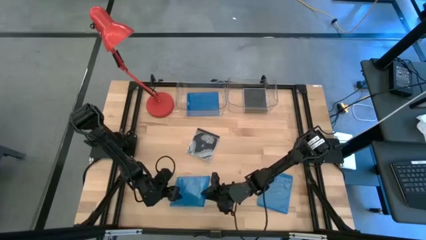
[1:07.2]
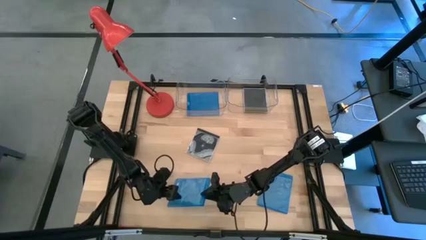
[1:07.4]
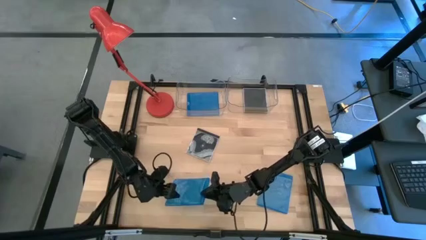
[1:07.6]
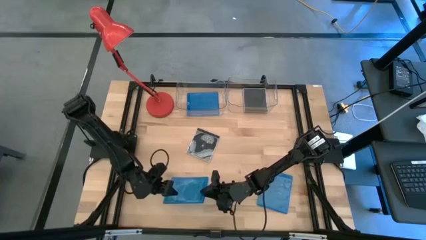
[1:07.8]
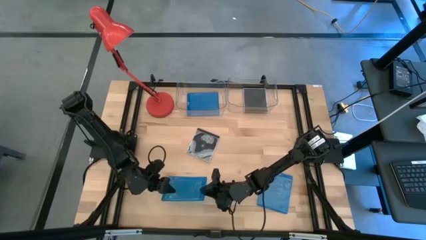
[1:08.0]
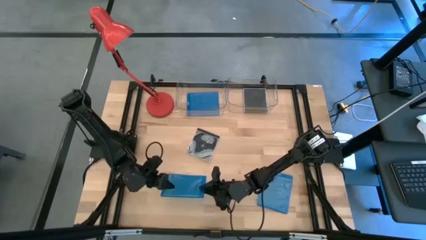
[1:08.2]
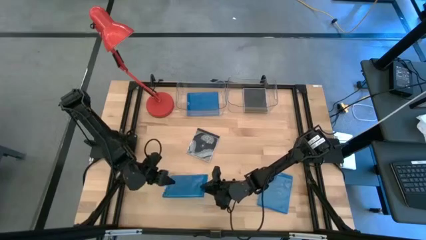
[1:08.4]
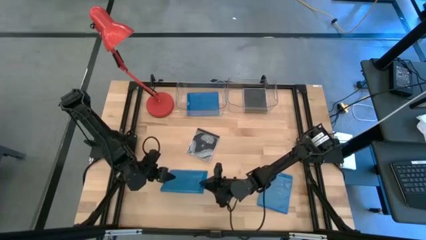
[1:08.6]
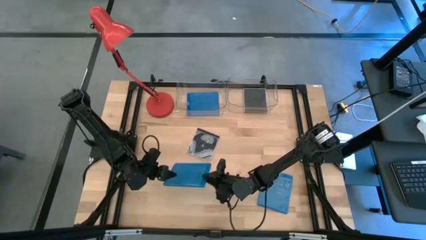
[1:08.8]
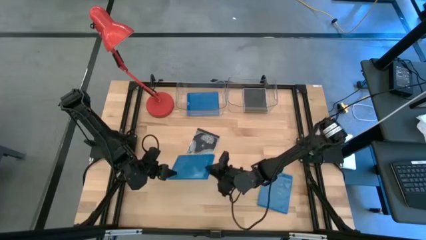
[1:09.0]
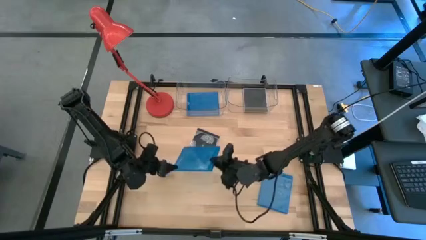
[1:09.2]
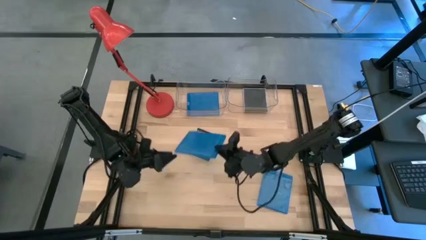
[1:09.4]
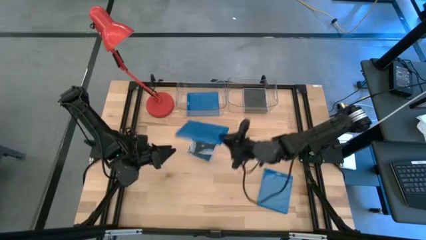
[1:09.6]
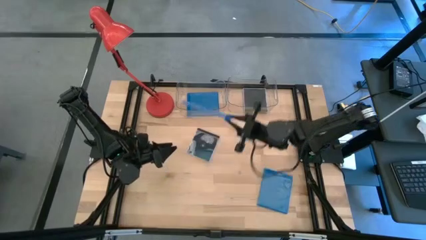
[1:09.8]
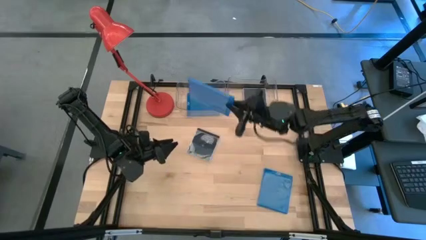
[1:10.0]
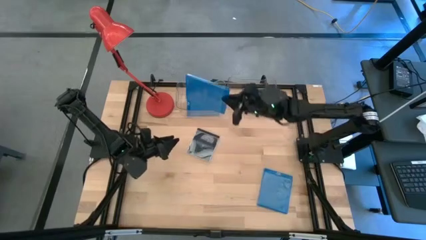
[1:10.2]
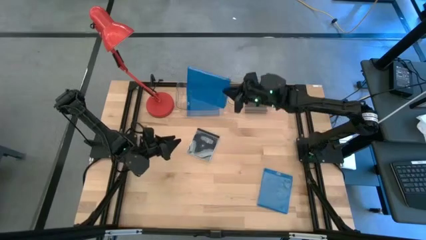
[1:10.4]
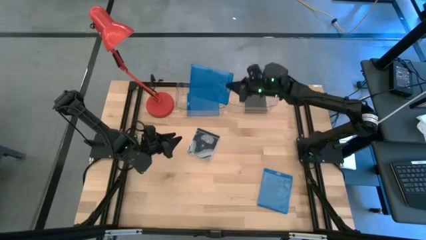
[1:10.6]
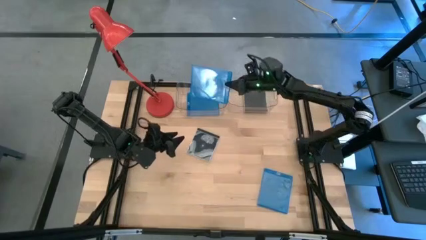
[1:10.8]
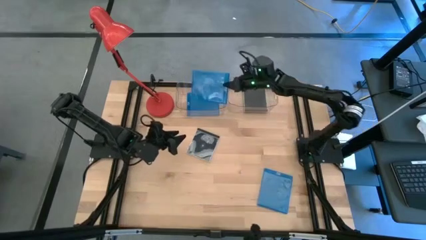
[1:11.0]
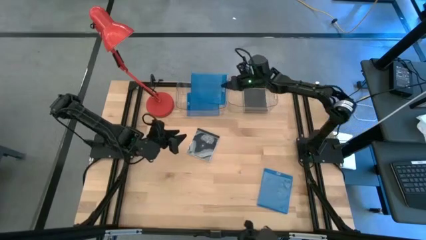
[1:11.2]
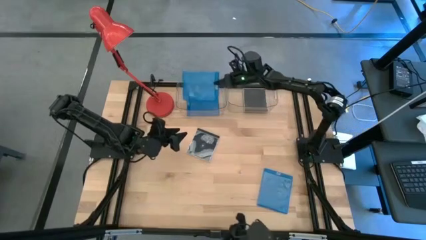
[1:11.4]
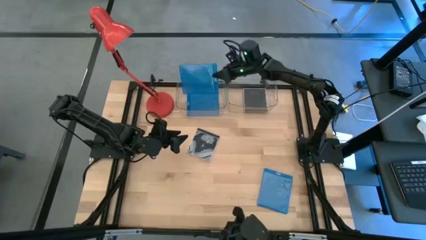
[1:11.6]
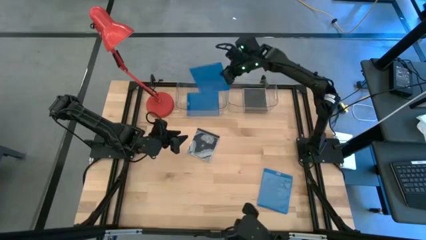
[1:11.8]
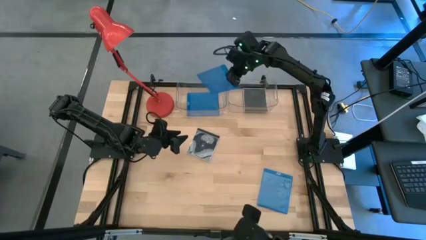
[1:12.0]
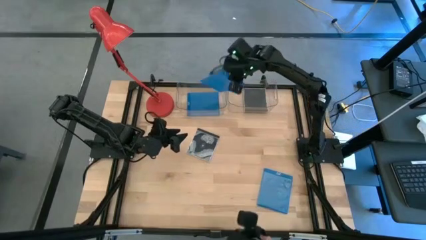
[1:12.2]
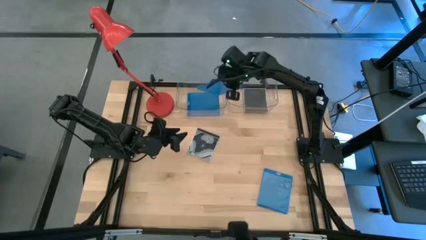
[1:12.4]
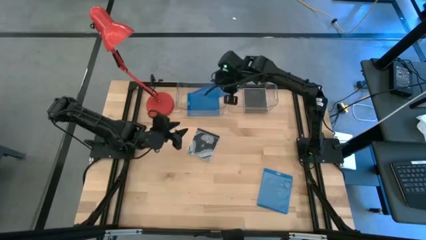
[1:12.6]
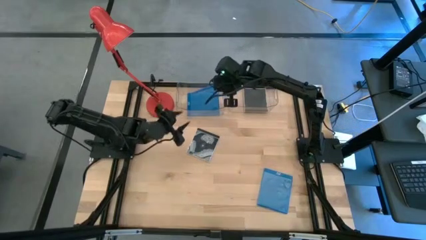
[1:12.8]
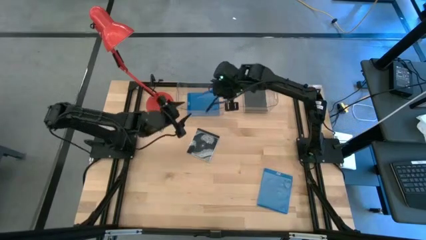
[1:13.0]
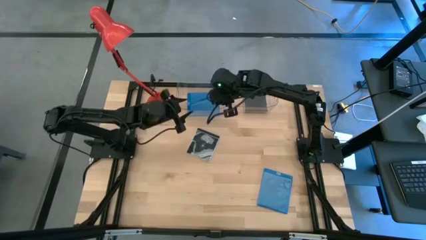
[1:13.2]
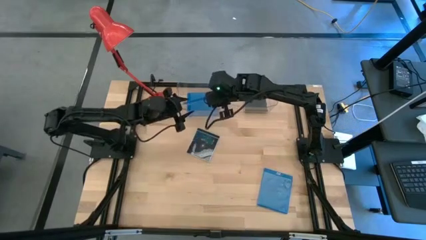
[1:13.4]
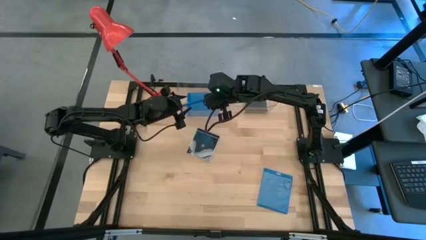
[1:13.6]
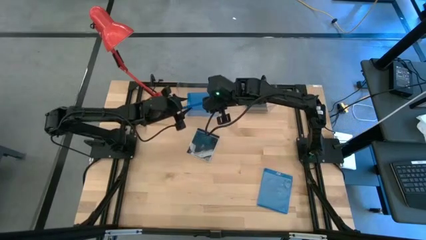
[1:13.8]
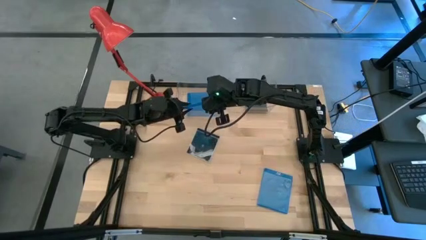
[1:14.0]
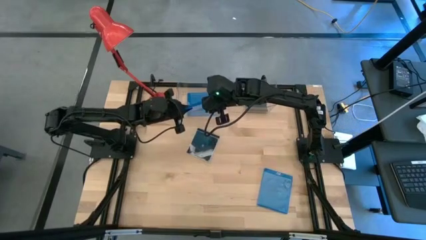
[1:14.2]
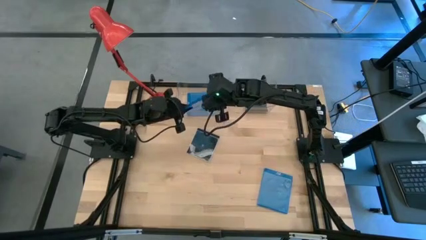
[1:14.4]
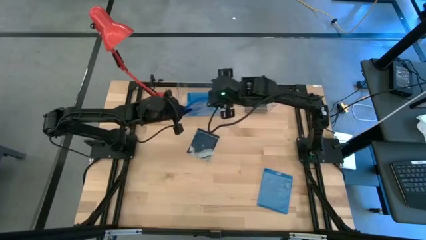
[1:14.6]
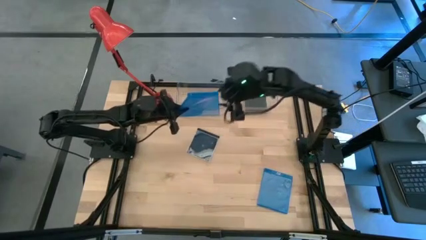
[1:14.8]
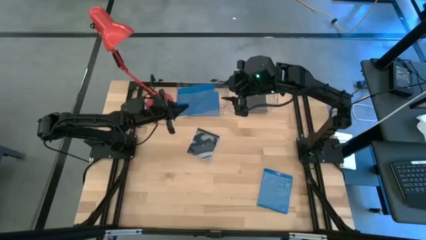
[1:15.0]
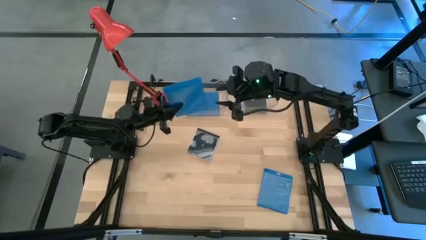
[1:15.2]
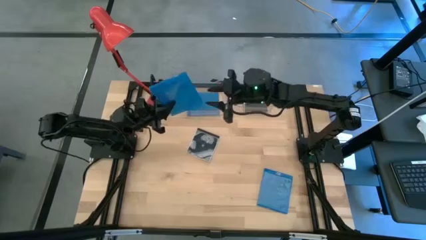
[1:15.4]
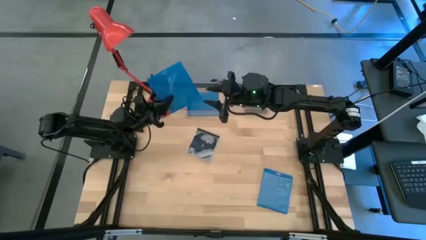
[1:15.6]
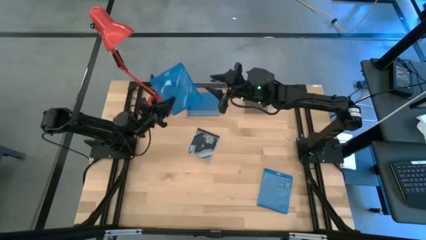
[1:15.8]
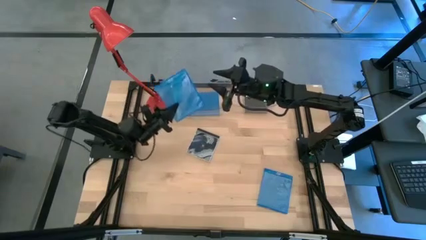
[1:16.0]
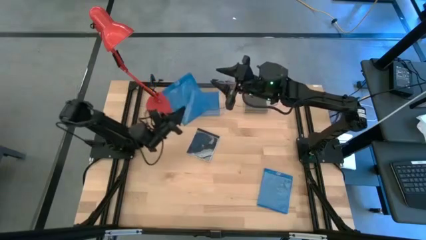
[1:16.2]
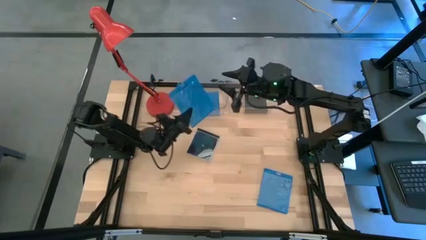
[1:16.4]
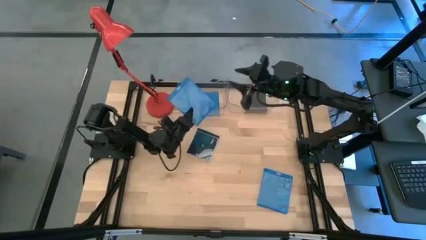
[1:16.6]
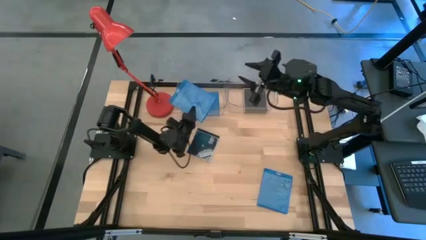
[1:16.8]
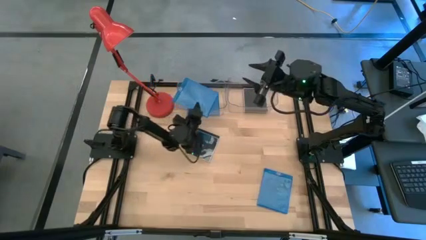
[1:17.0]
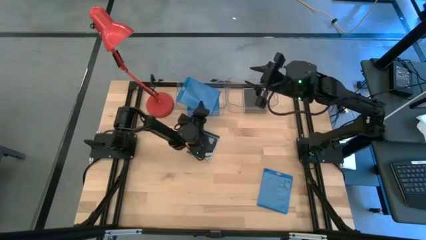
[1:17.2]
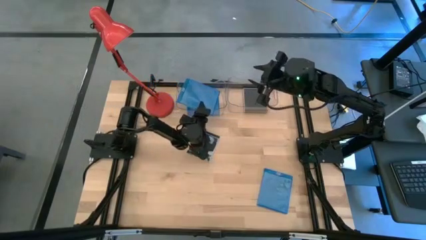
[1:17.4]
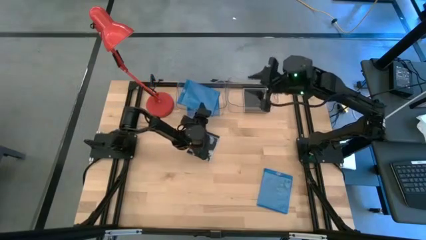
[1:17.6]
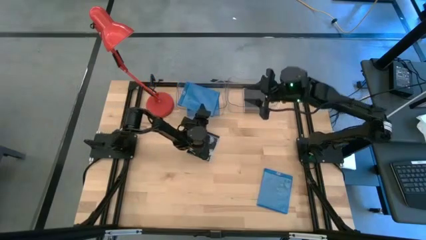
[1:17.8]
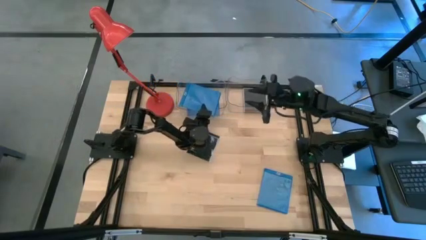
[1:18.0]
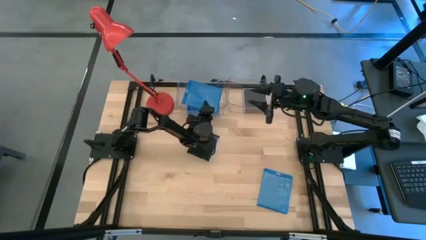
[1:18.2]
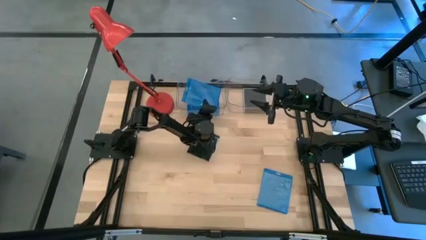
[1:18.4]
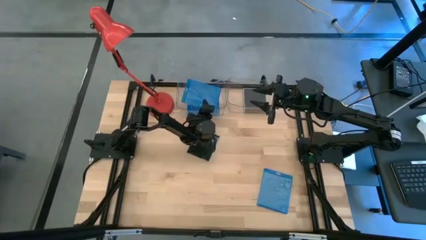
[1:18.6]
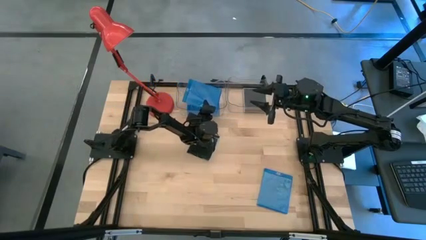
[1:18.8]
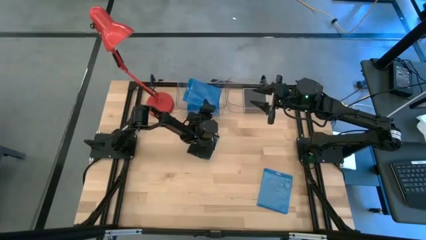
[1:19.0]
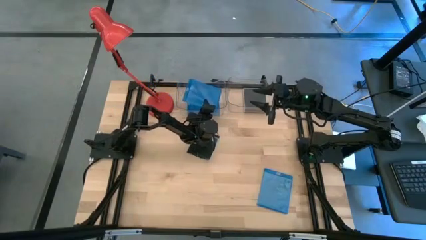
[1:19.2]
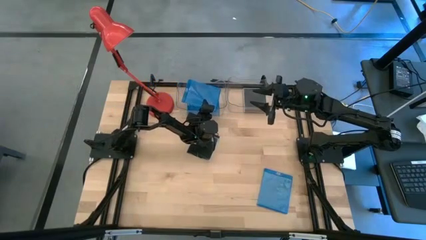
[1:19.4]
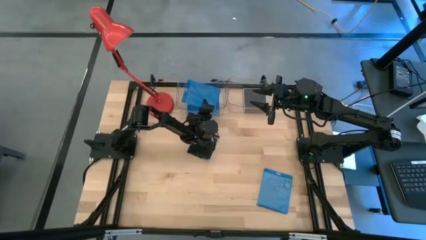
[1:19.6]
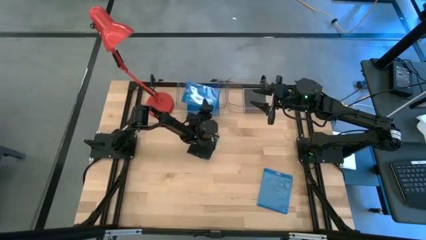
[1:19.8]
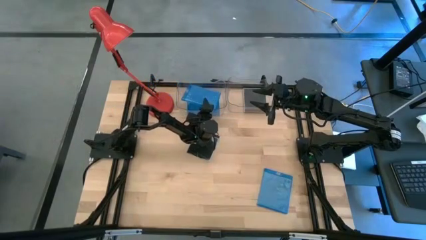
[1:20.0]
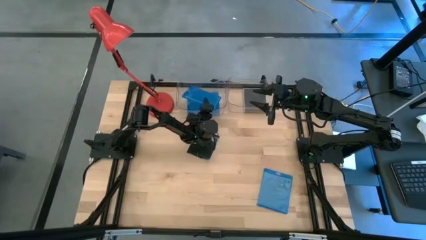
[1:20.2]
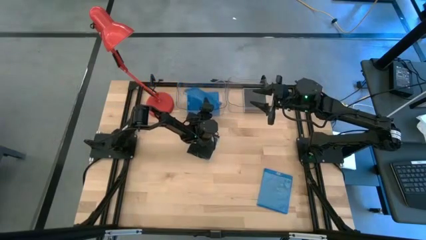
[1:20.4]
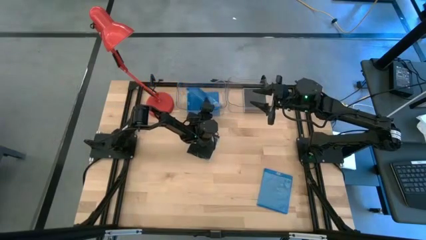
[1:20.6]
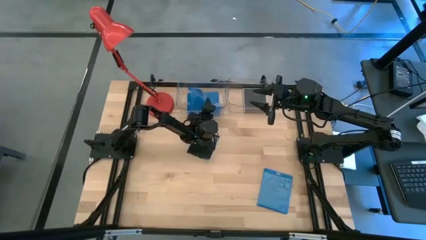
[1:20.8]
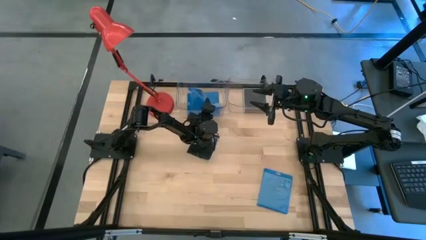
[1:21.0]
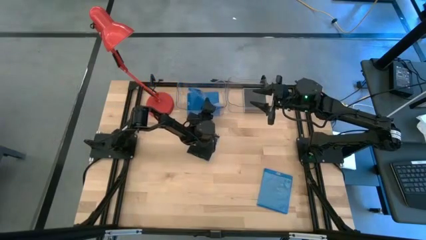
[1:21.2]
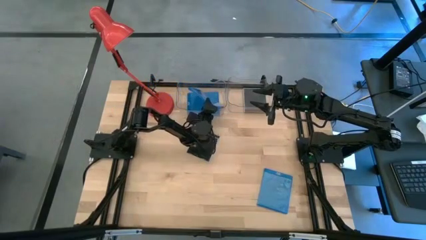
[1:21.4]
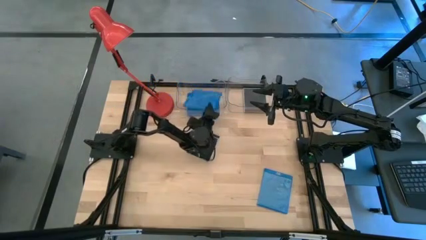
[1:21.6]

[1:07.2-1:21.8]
Task: Pick & place jewel cases by type
Put the left blue cd case into the left transparent bin

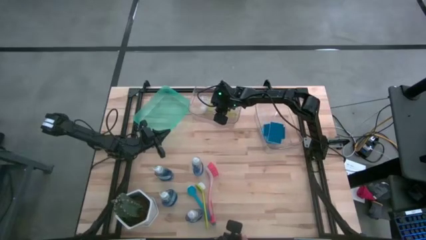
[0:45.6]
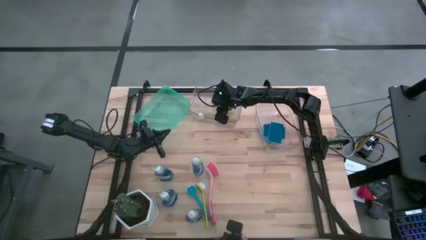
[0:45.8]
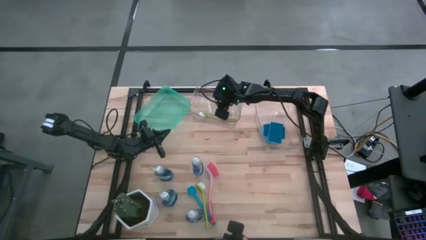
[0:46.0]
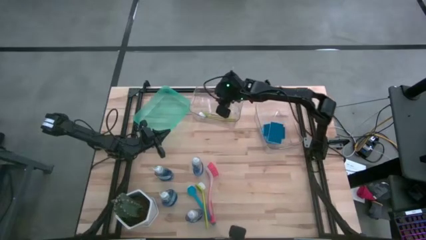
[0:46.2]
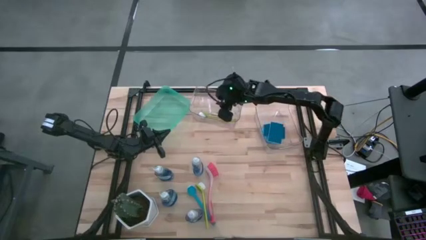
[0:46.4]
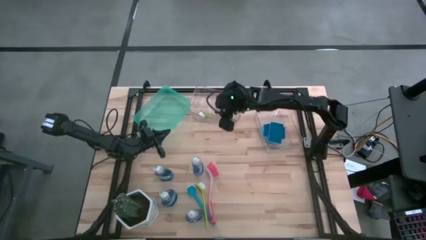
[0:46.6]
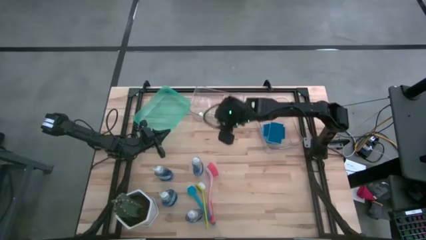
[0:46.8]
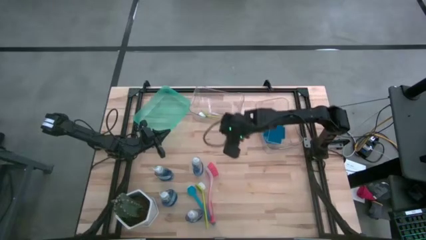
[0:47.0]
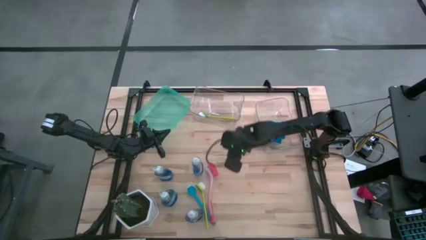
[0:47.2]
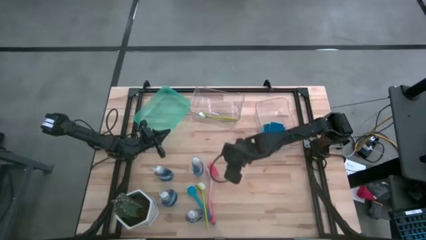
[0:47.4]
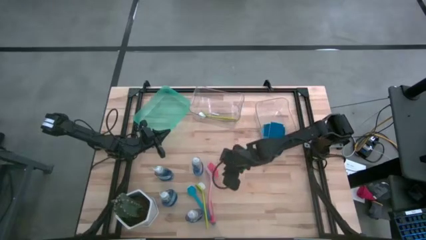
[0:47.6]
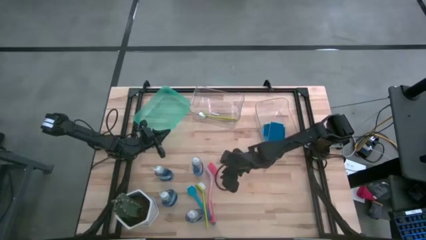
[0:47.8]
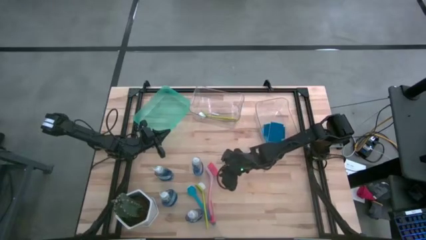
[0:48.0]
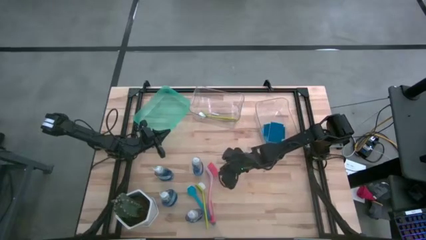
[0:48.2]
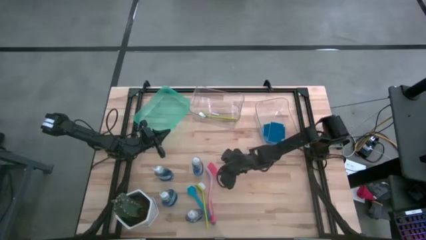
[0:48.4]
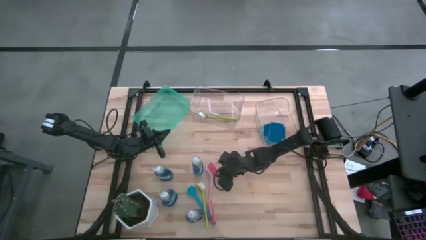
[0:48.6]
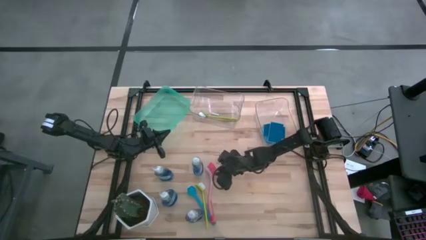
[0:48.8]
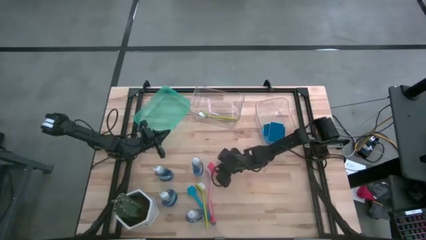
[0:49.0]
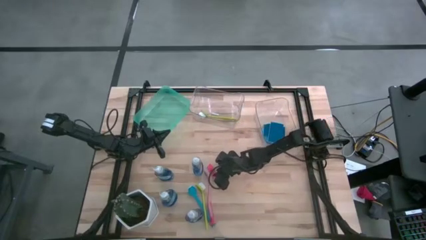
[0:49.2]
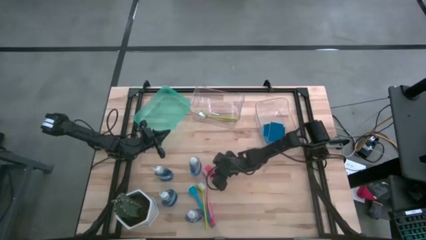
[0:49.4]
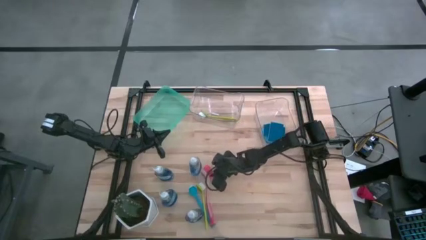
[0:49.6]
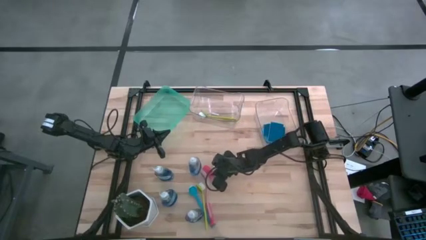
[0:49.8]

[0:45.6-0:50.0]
Task: Pick & Place Kitchen Sink Supplies
Put the red dish brush in the left transparent bin
